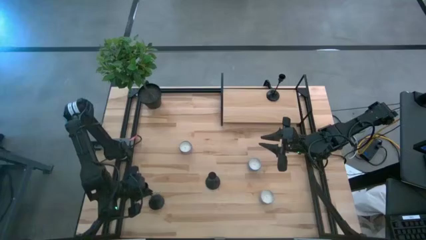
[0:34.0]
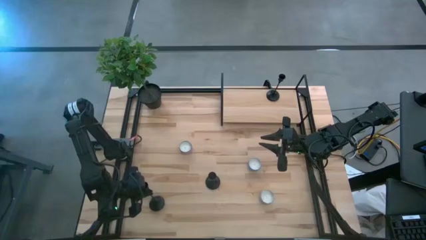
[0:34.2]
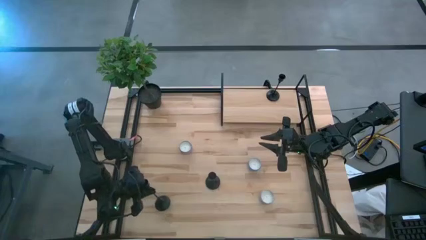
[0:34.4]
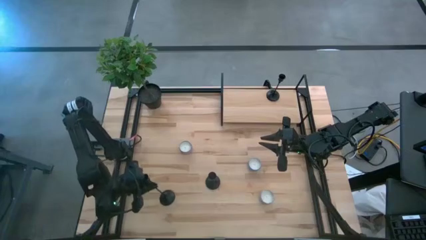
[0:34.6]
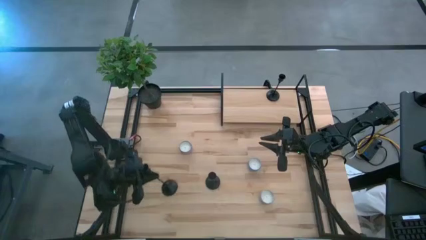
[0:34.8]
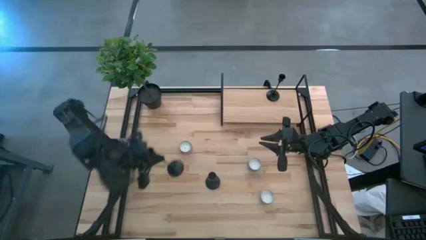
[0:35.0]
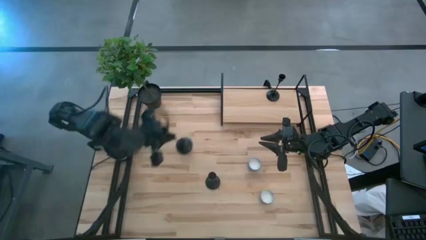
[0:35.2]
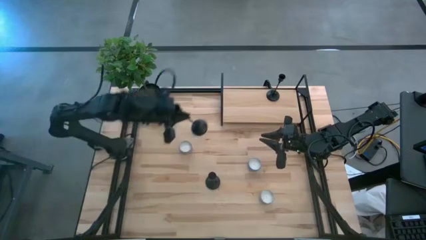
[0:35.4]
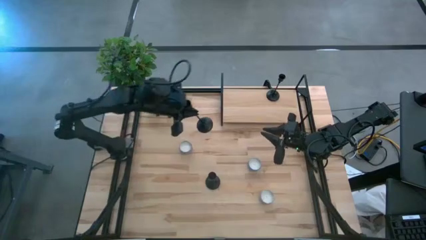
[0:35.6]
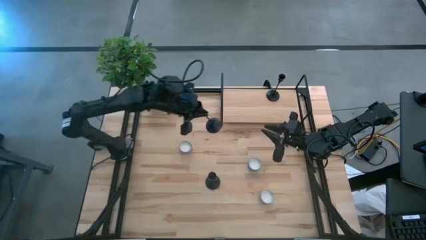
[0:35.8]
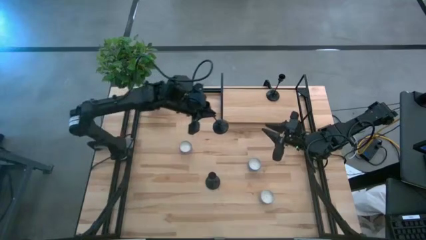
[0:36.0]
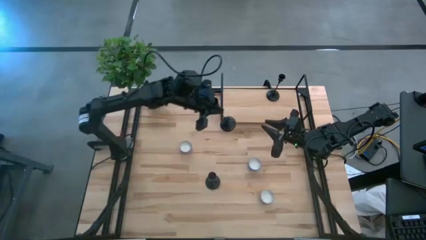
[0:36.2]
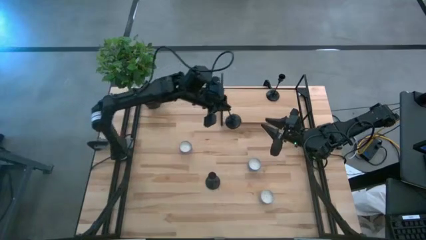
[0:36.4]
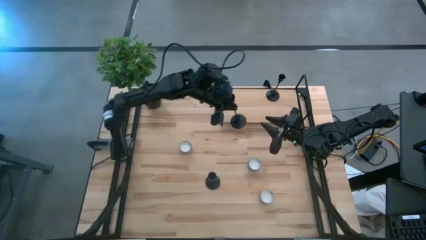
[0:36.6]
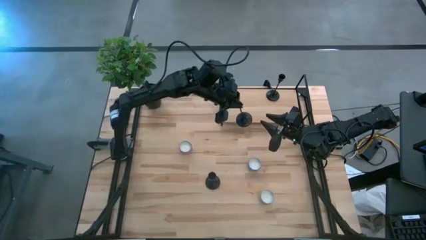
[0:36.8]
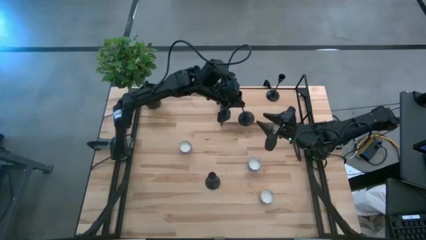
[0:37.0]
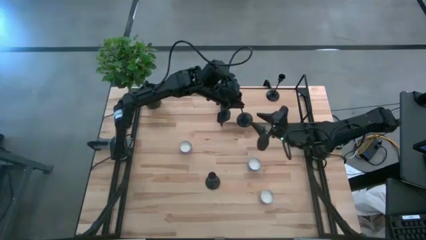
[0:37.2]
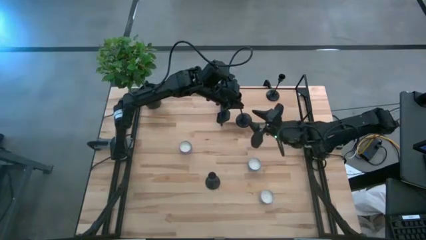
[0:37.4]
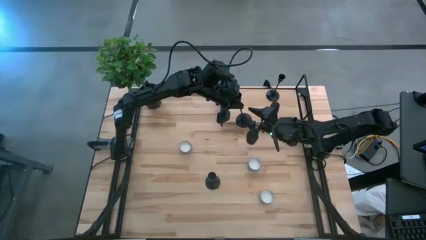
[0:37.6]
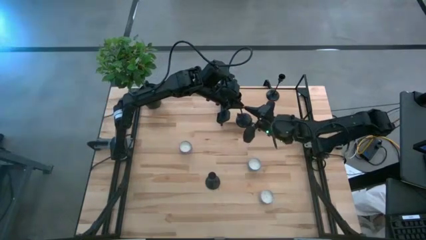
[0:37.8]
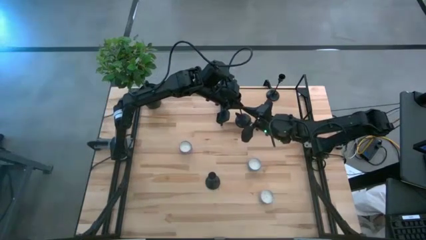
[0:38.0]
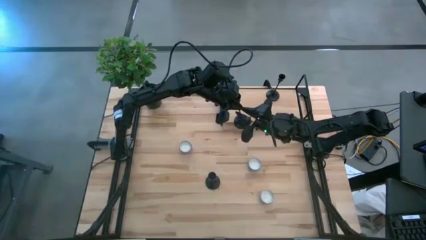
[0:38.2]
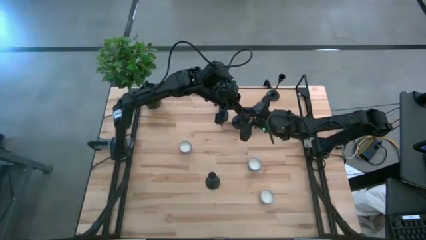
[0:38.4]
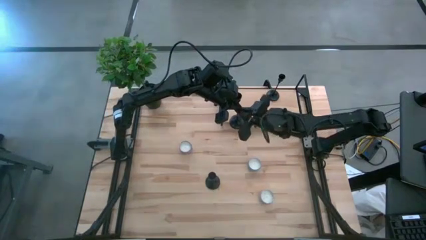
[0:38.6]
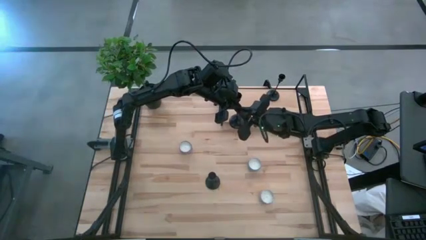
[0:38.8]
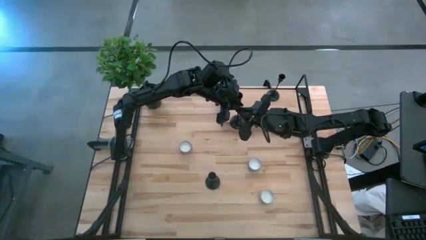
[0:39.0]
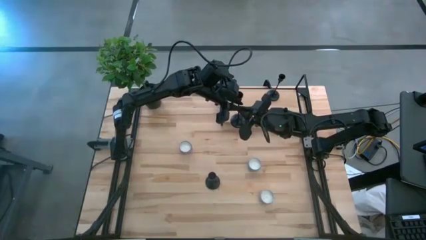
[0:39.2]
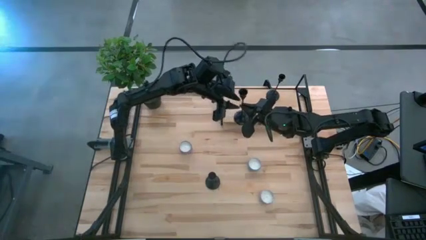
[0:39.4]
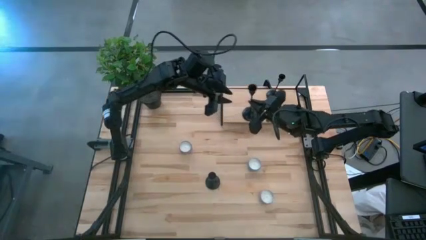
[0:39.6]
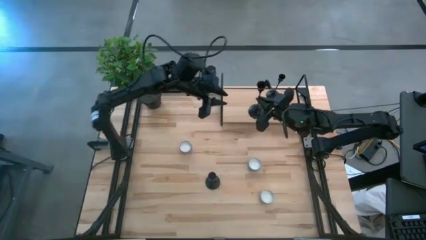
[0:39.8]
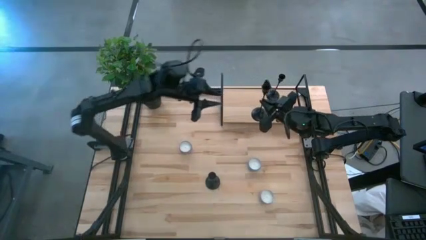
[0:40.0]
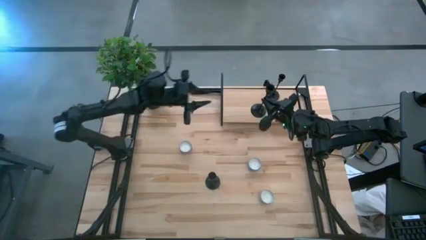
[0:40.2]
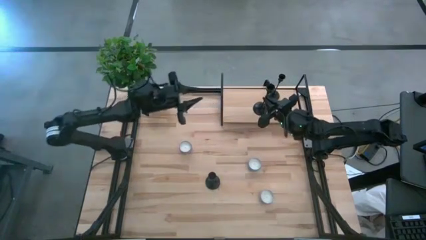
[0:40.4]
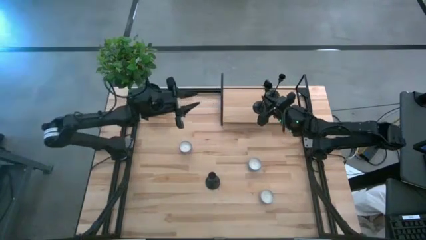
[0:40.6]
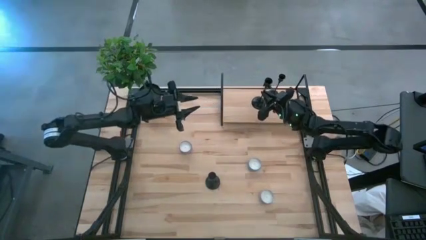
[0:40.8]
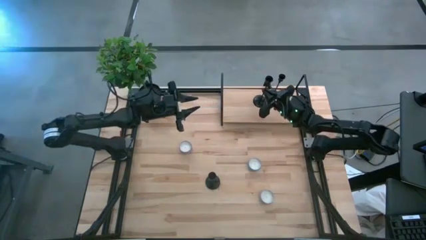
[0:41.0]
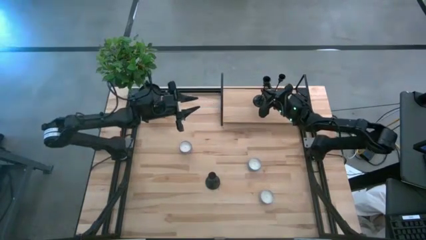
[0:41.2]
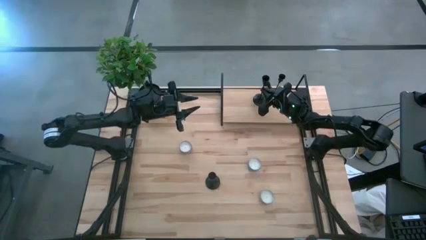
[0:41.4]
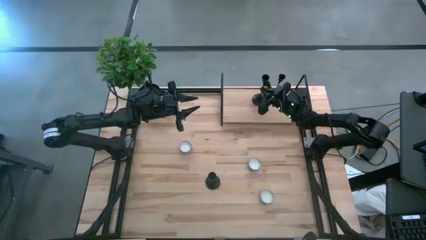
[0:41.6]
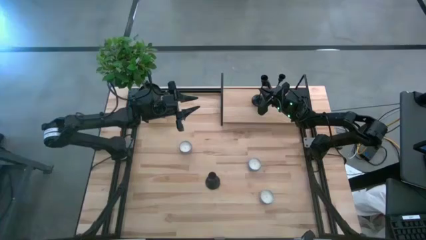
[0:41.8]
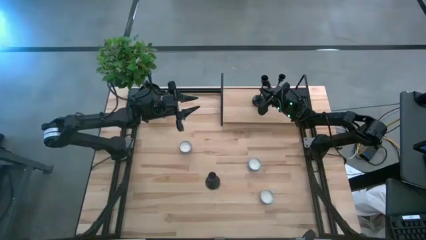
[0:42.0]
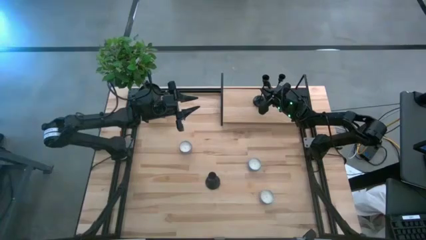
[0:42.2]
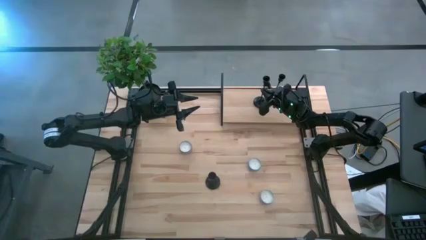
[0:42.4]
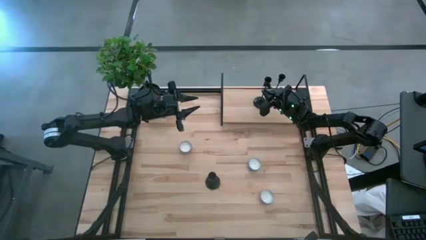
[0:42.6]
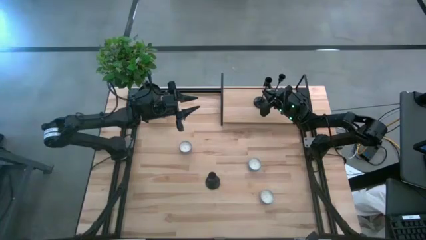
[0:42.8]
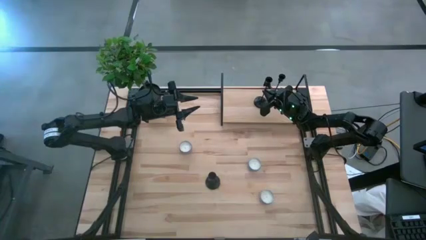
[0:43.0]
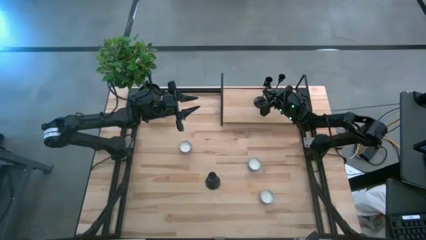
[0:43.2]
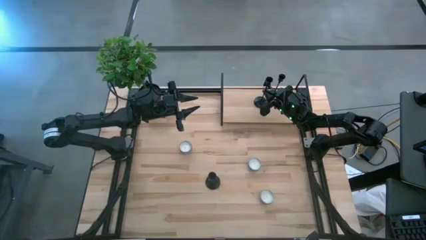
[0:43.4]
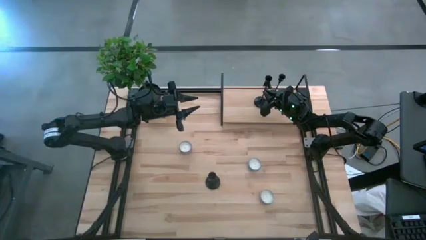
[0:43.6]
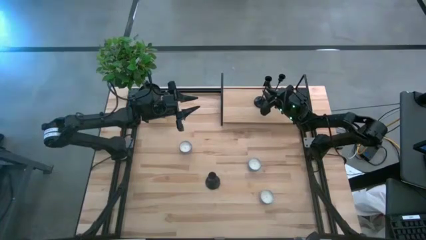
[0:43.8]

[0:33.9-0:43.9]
Task: Pick & Place candle stick holders
Put the bottom left black candle holder on the shelf

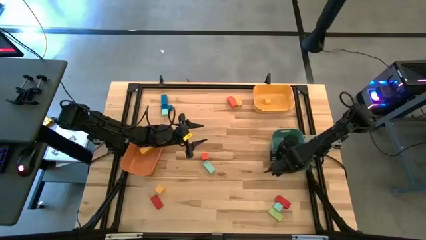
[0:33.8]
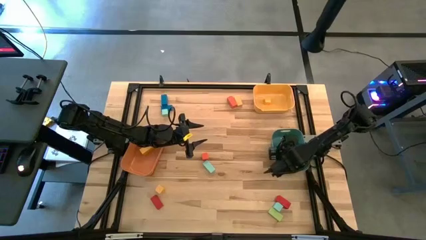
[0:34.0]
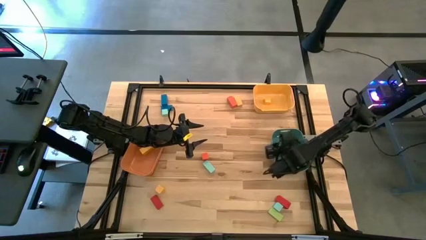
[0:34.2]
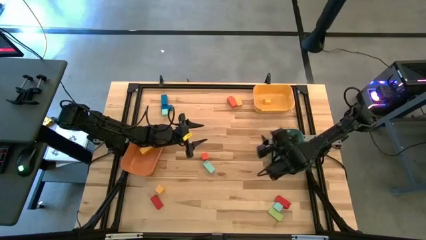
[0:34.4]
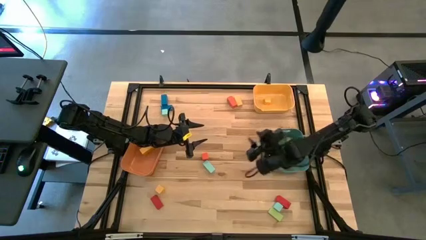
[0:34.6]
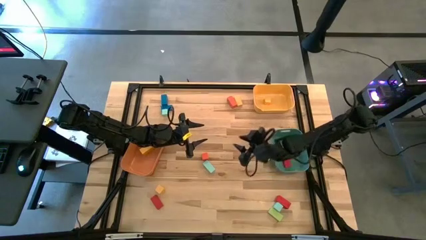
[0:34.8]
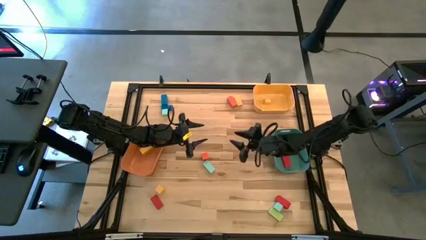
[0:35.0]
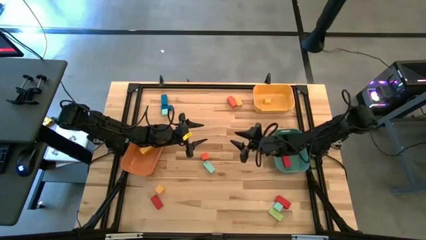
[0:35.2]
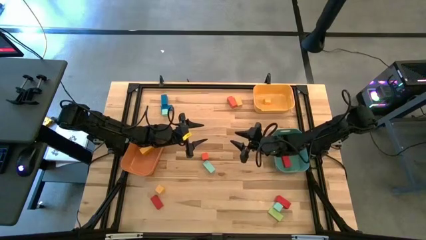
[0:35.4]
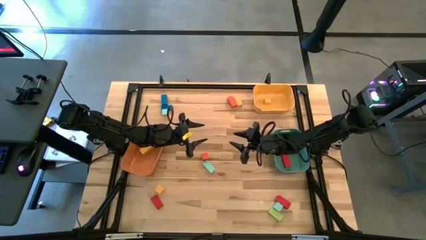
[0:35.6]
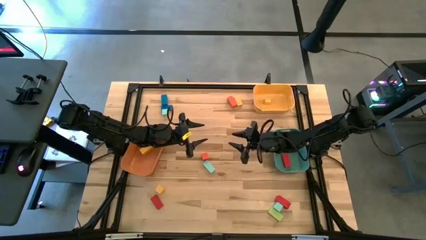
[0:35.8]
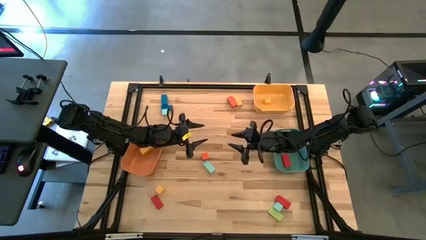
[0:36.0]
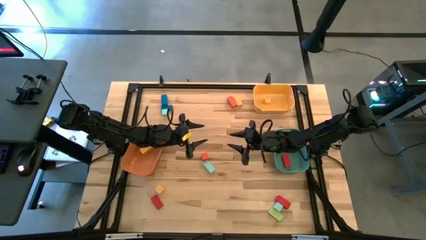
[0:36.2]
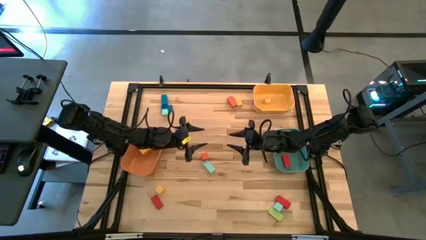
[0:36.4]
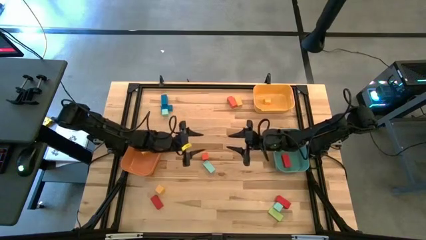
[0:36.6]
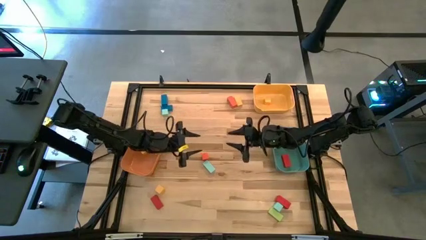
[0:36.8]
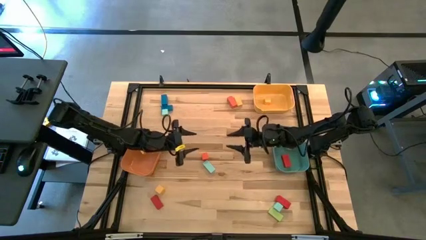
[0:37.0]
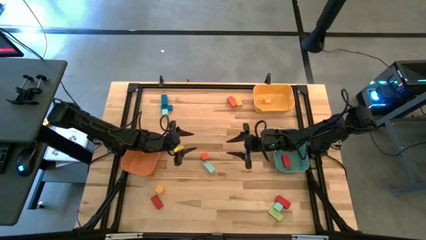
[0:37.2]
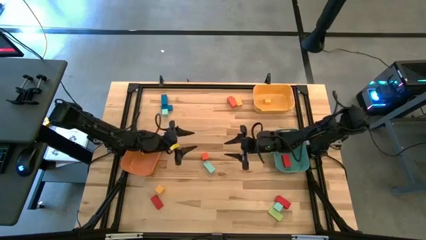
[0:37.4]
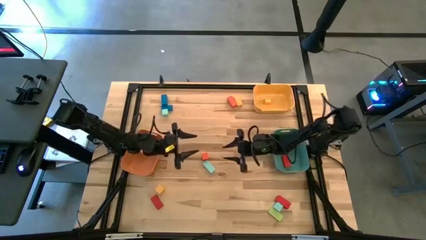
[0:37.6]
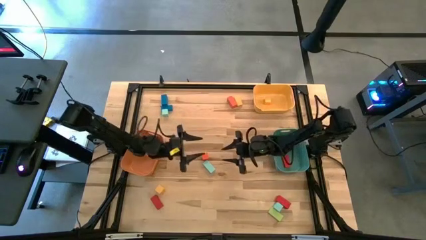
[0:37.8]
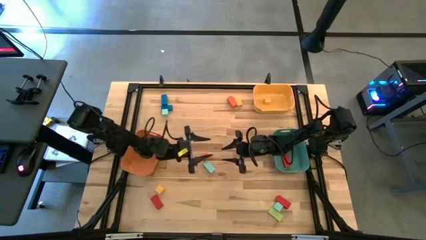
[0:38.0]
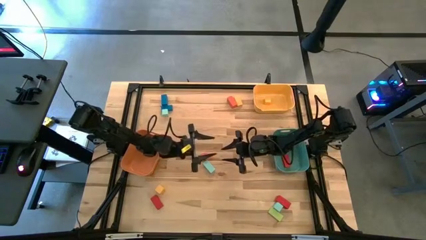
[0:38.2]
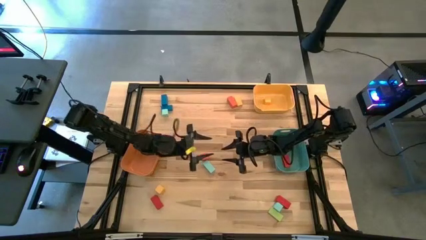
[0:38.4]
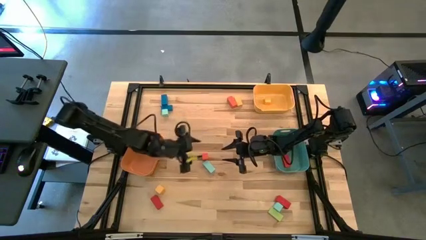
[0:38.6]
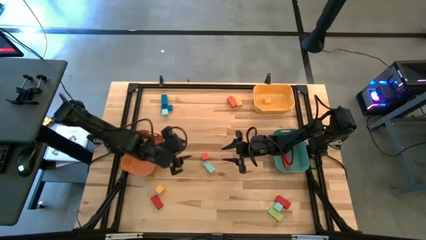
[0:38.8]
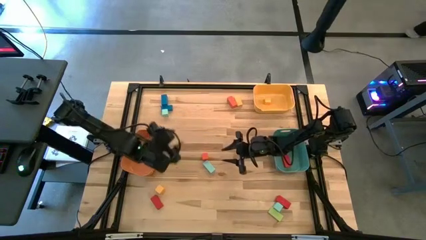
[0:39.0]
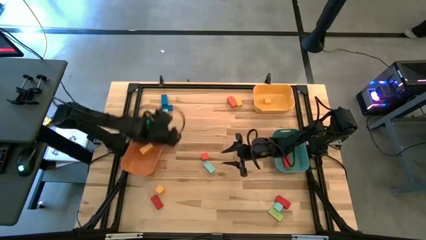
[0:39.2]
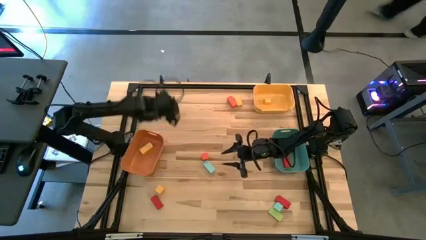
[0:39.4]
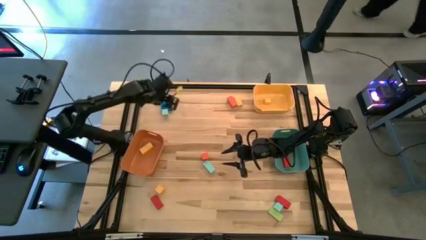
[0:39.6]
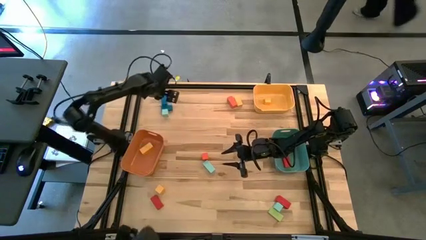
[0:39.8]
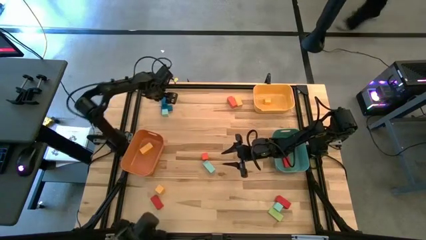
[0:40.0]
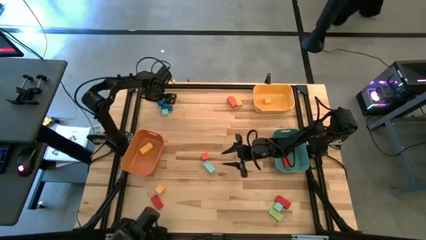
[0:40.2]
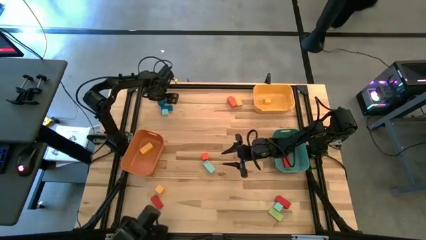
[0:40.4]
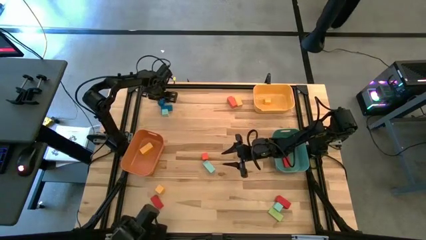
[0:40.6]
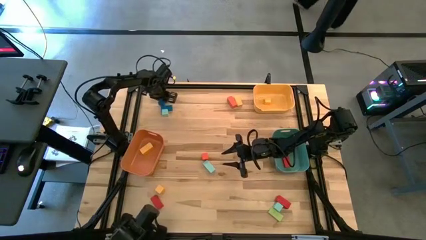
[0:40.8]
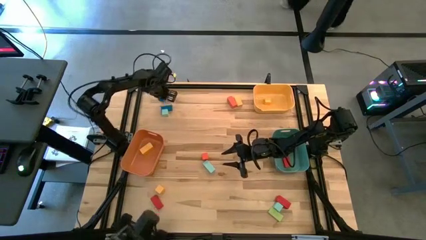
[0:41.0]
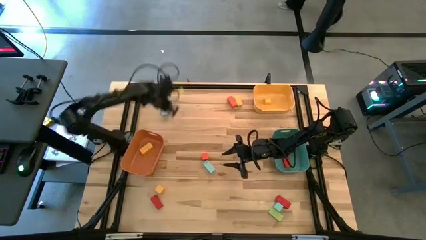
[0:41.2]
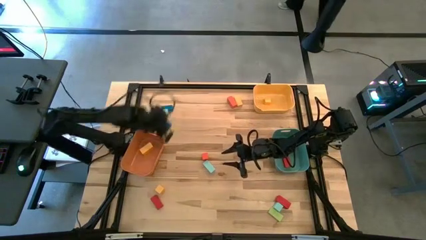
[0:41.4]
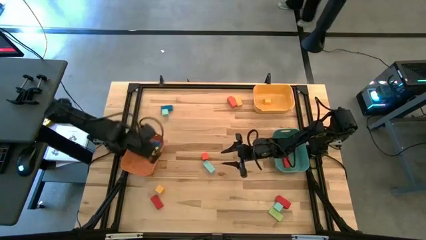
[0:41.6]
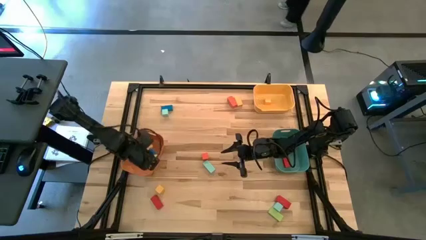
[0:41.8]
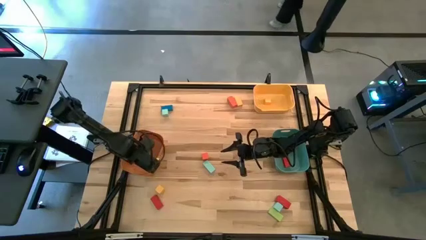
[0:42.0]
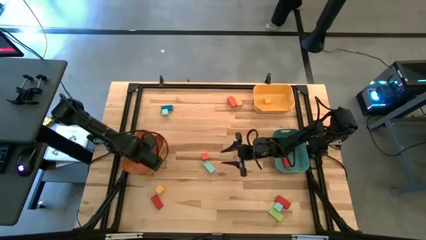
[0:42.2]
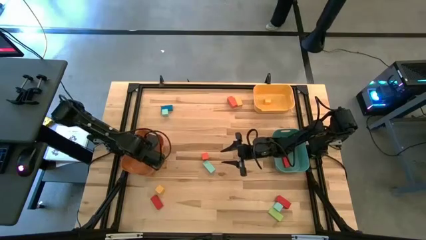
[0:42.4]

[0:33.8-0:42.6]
Task: Sort blocks by size
Put the thick blue rectangular block into the orange bin
